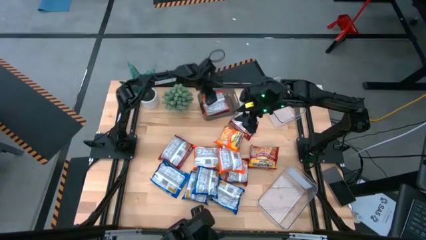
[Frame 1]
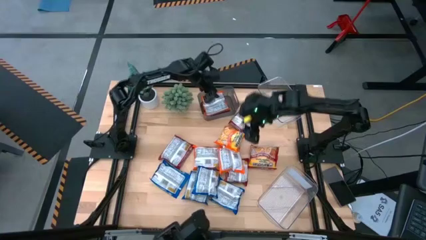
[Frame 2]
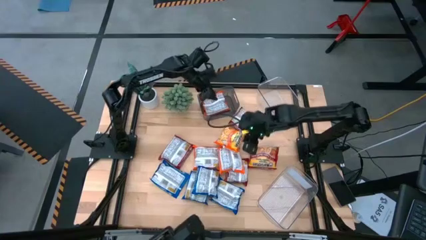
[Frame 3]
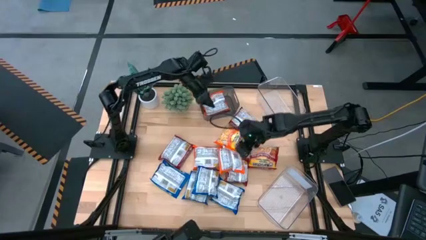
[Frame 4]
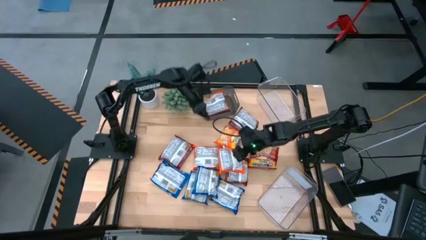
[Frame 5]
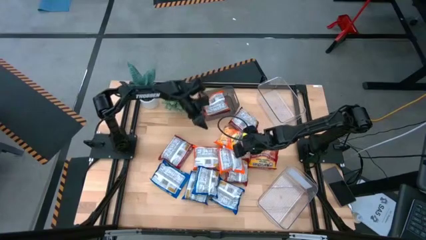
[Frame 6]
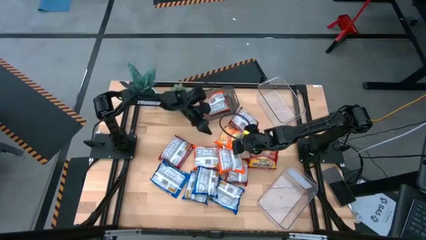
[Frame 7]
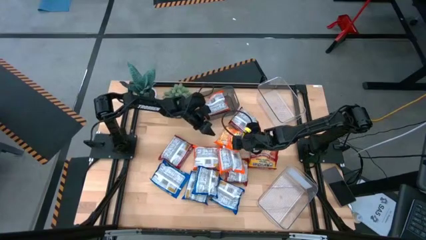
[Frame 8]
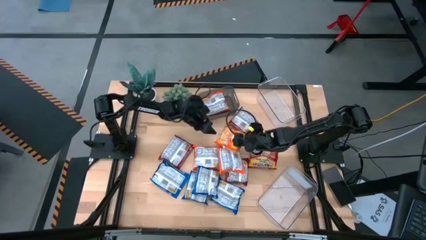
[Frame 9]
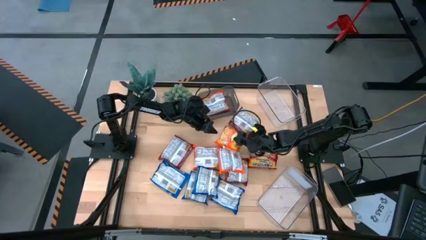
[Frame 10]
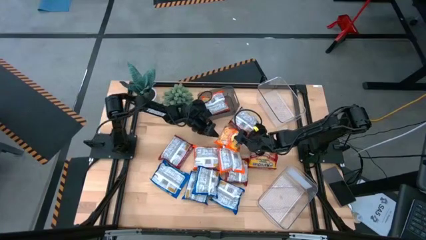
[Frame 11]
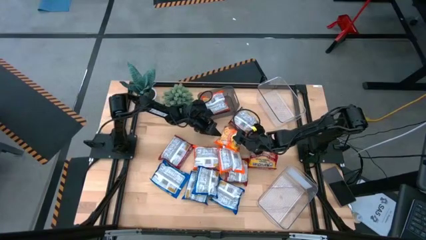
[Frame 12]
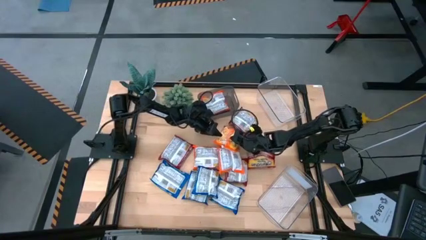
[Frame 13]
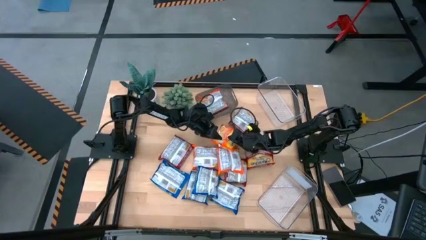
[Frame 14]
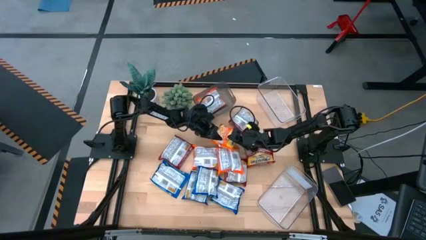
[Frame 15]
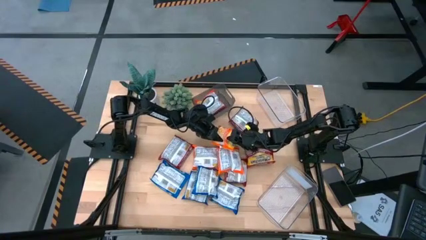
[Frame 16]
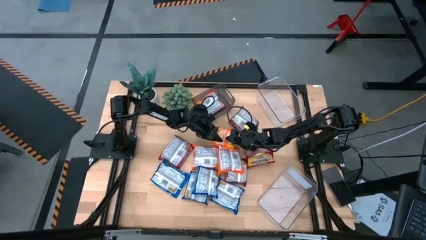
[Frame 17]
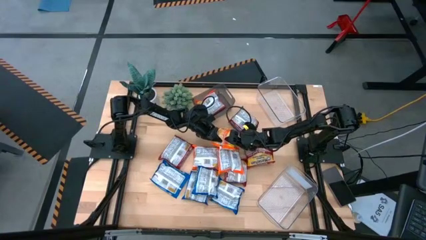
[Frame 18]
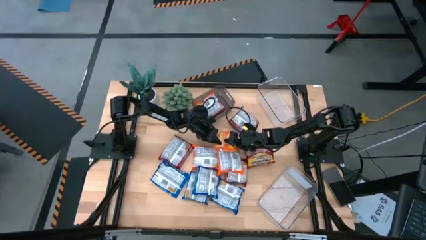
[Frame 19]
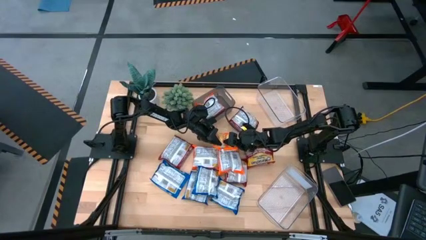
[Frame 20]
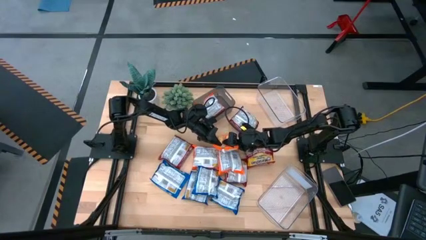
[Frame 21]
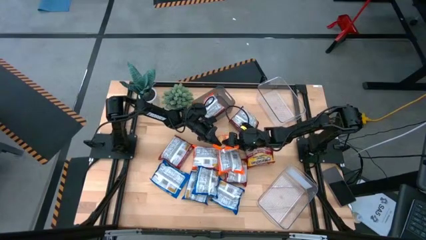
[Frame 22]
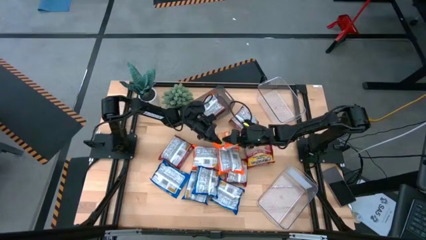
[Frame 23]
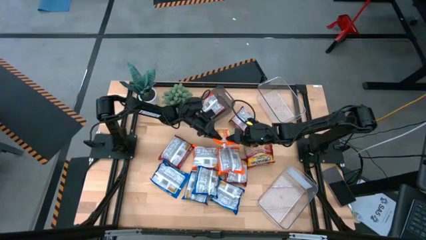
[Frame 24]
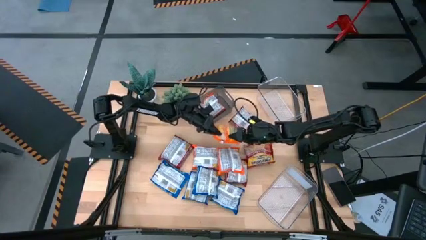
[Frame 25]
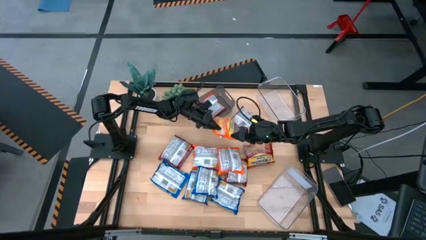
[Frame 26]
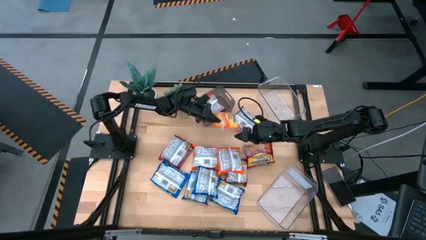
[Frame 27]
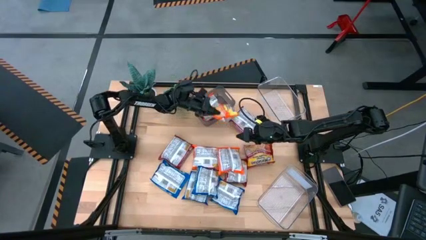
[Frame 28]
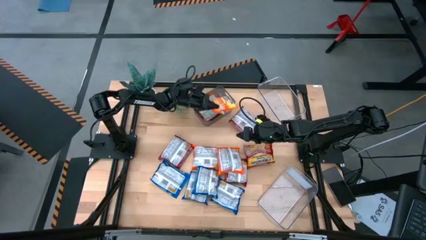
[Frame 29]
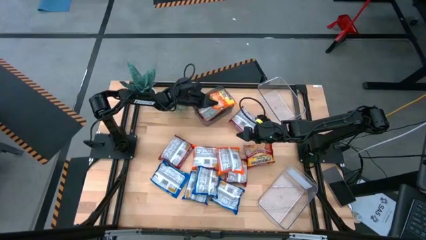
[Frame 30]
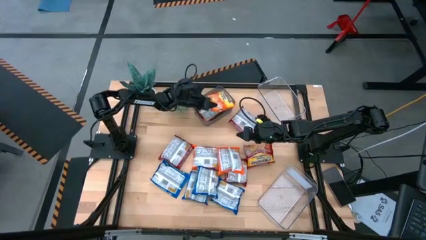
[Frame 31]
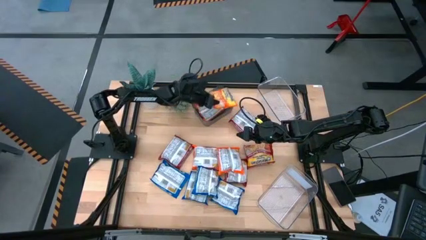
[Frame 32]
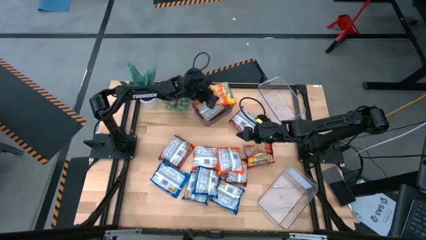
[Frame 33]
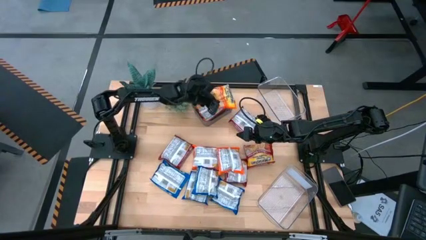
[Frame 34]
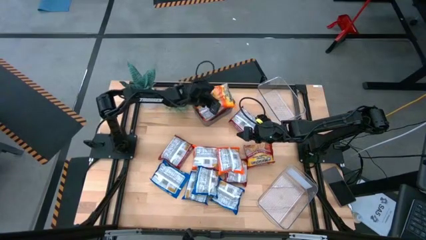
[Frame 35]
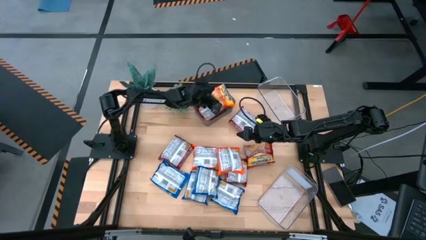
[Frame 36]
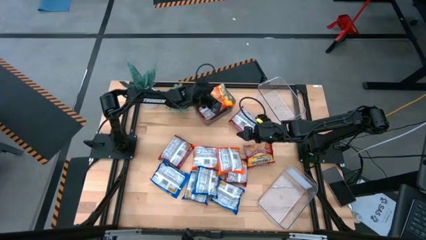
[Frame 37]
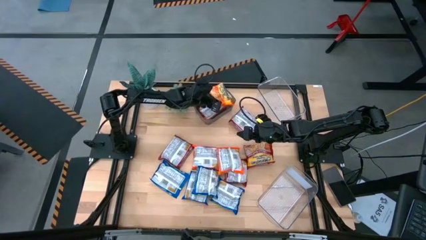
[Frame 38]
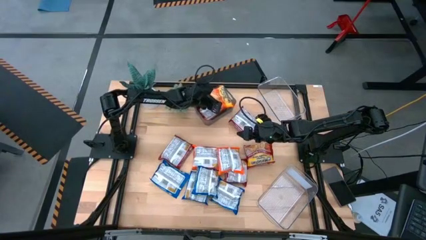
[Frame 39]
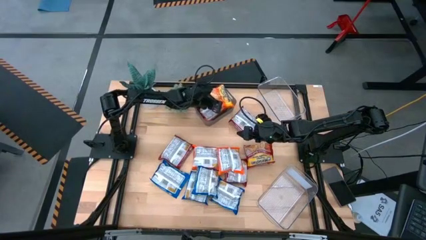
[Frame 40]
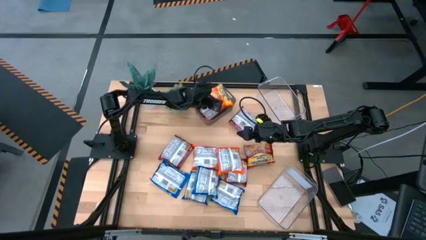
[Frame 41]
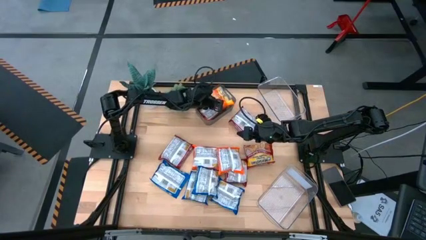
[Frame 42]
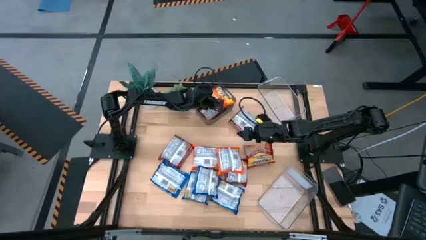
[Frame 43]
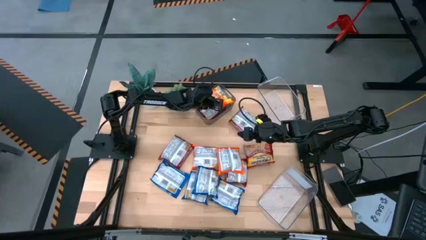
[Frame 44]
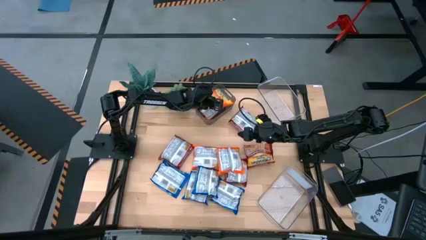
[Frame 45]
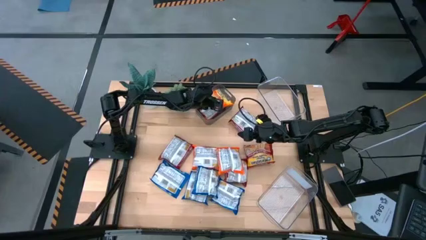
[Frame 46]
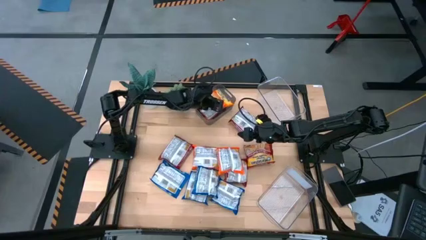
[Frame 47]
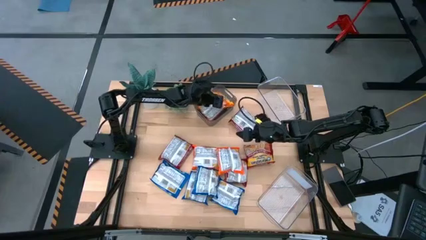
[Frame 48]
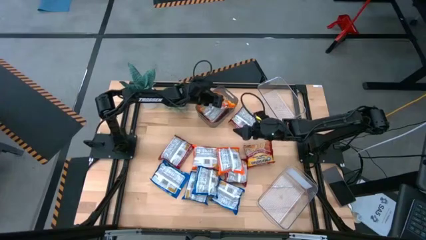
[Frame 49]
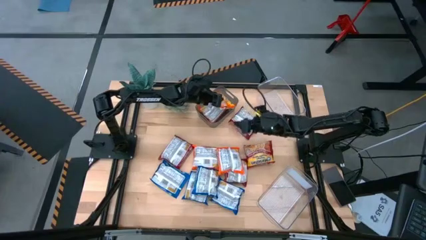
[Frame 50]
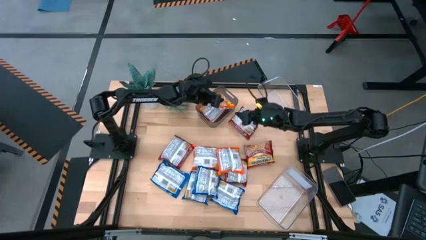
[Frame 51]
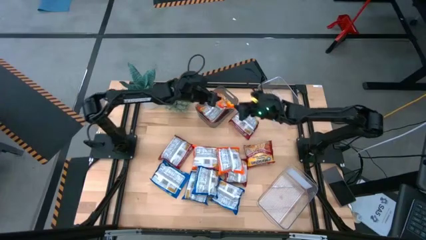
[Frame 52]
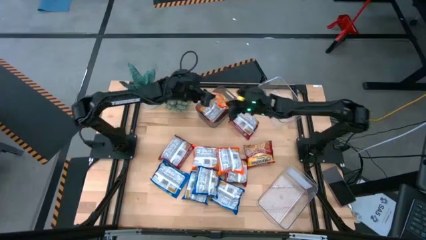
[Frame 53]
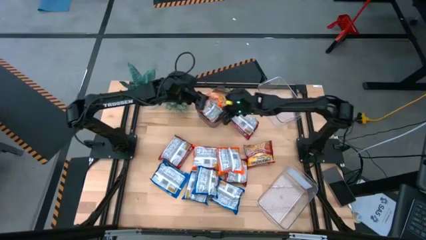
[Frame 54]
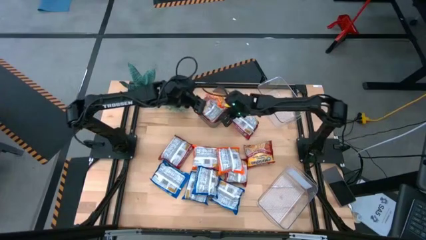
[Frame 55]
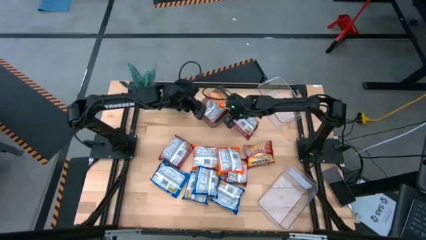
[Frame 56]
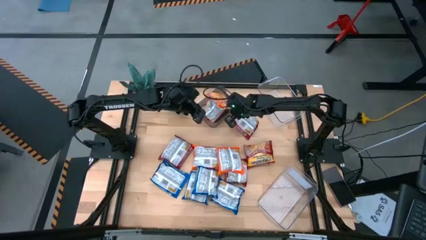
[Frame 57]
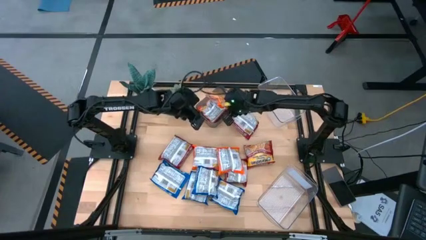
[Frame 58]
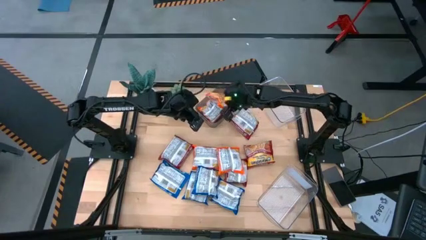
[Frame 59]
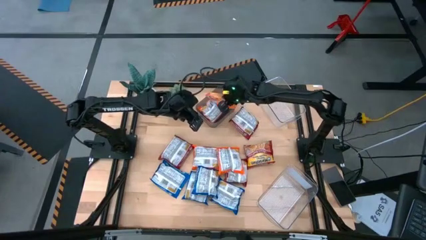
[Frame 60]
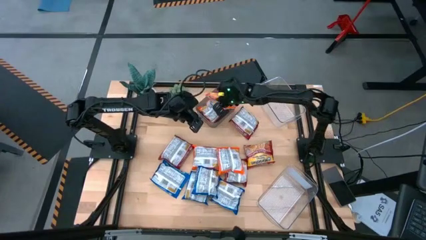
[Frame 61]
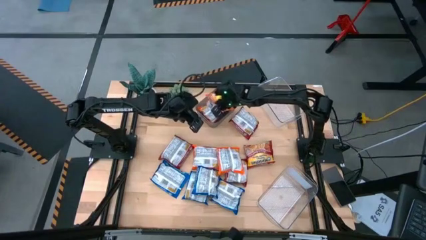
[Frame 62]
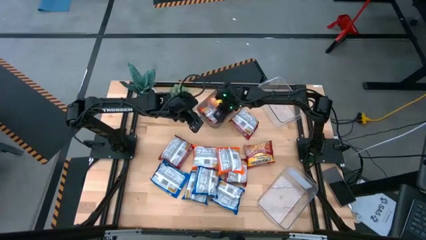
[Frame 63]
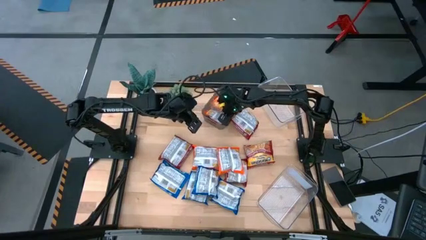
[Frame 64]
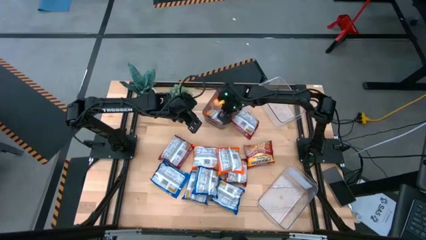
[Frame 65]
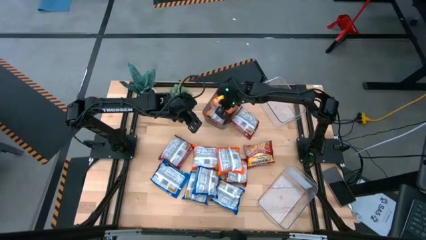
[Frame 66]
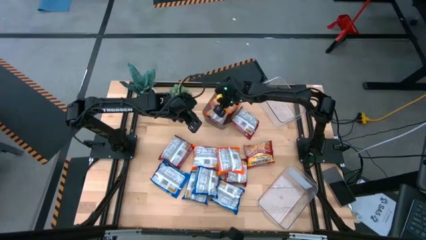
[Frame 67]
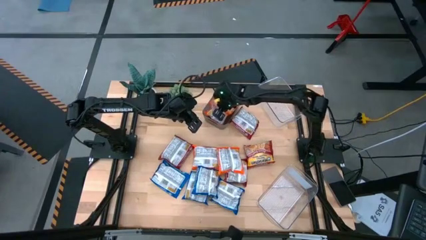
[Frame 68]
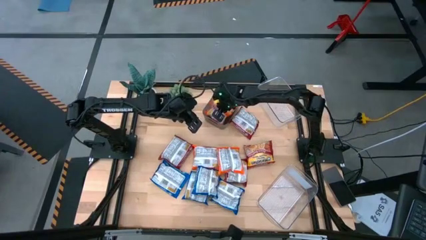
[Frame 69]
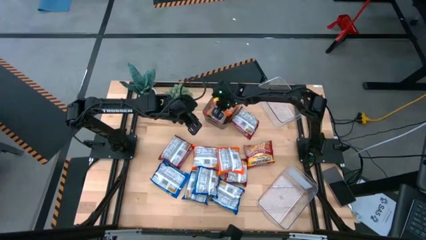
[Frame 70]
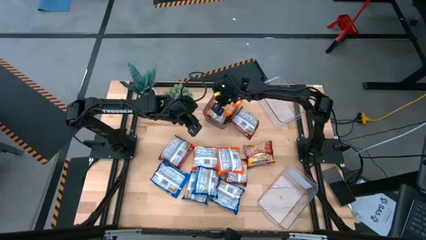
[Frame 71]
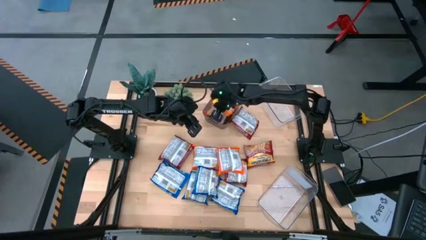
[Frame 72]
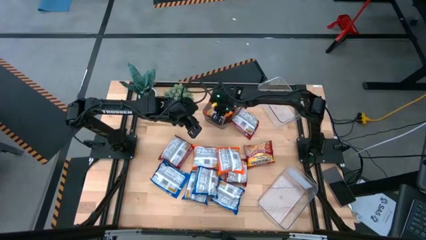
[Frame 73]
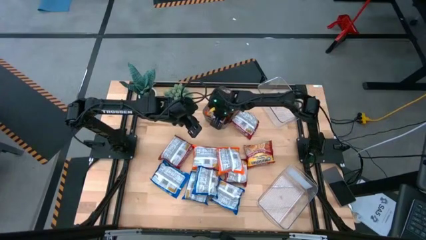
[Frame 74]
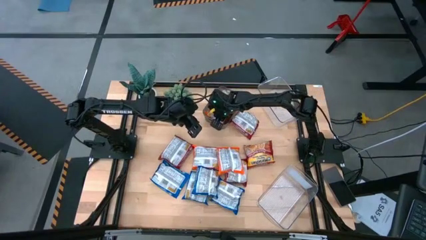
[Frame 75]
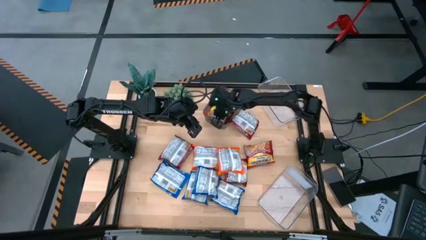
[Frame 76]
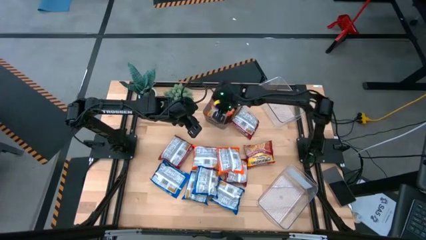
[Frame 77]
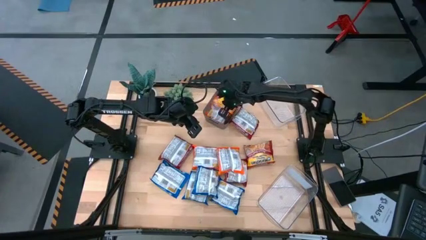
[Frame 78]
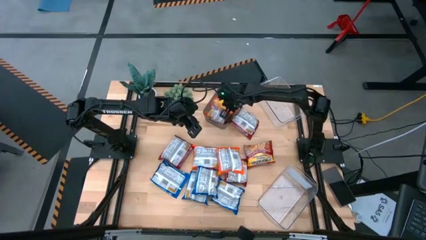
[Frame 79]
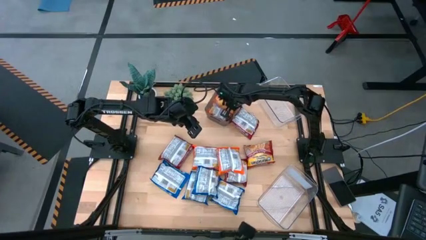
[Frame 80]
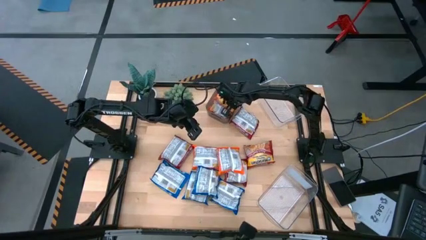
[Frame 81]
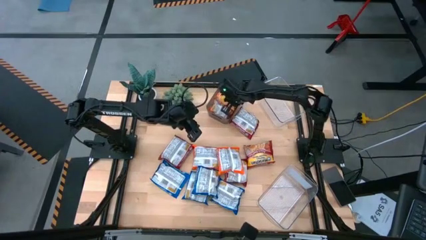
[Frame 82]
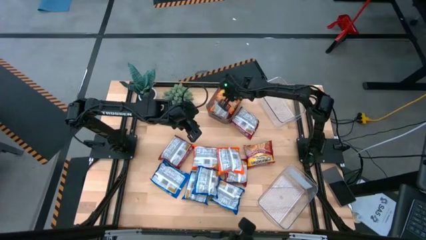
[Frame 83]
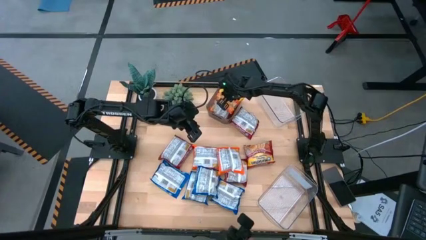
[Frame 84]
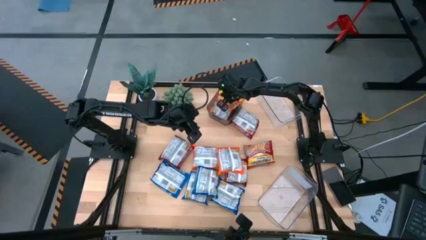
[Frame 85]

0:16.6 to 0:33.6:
Task: Sort Maruchan noodles
Put the orange noodle pack into the black bin
